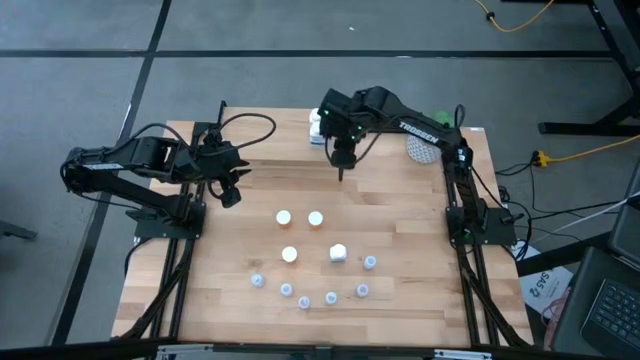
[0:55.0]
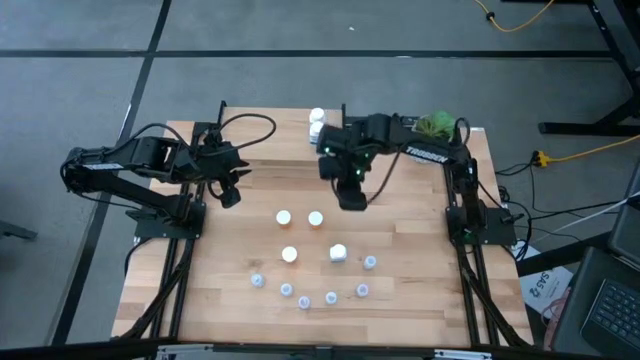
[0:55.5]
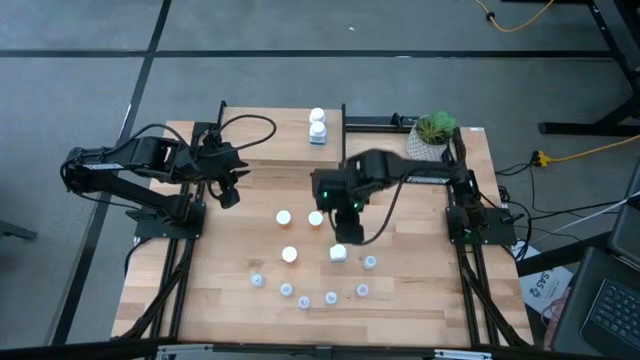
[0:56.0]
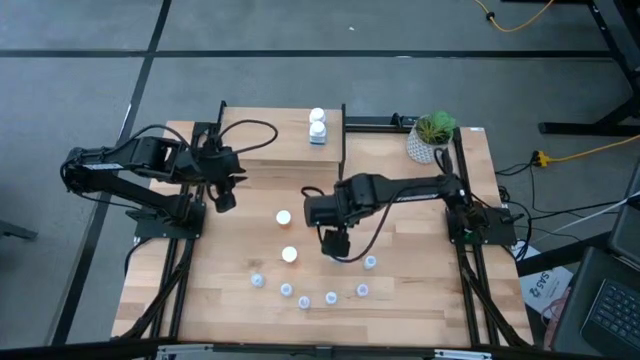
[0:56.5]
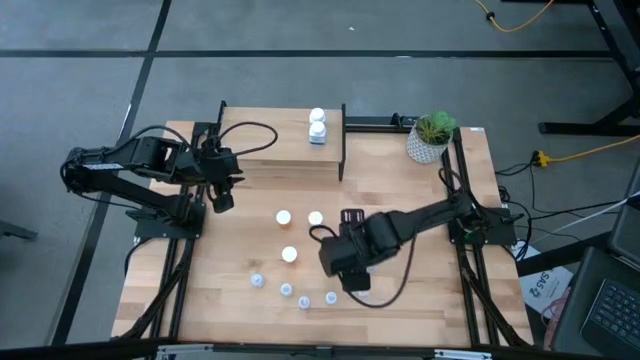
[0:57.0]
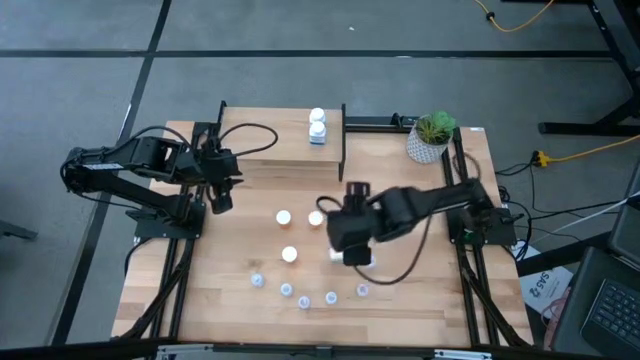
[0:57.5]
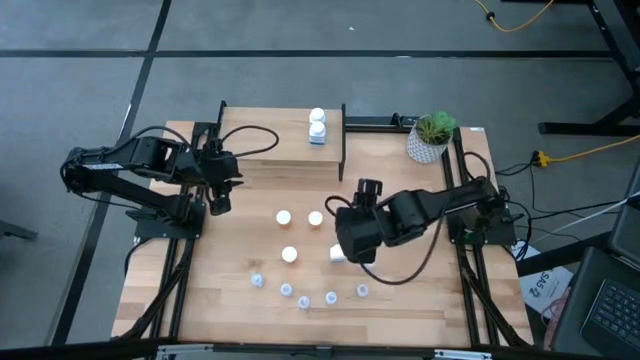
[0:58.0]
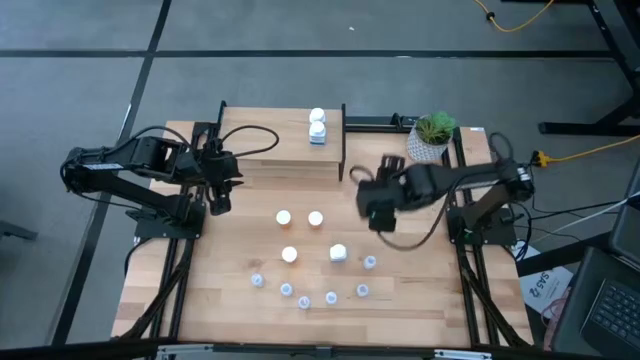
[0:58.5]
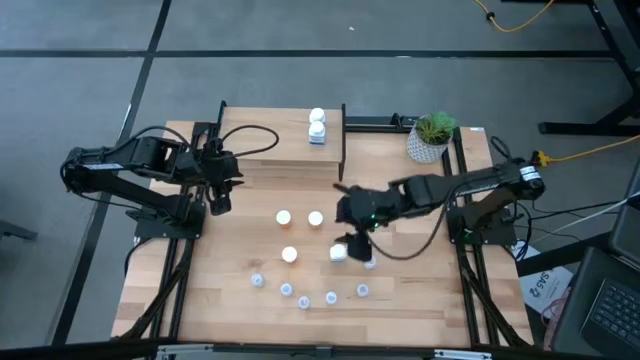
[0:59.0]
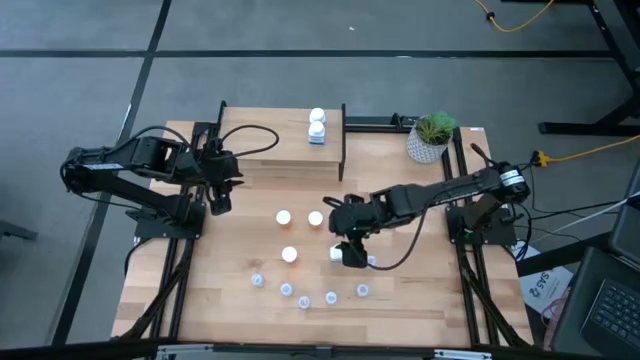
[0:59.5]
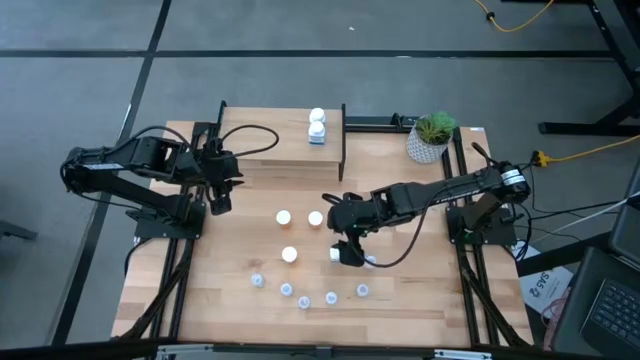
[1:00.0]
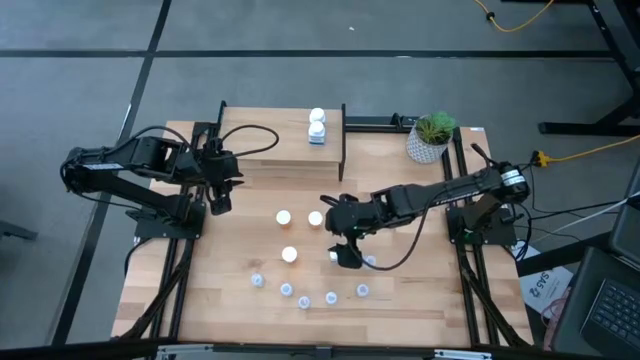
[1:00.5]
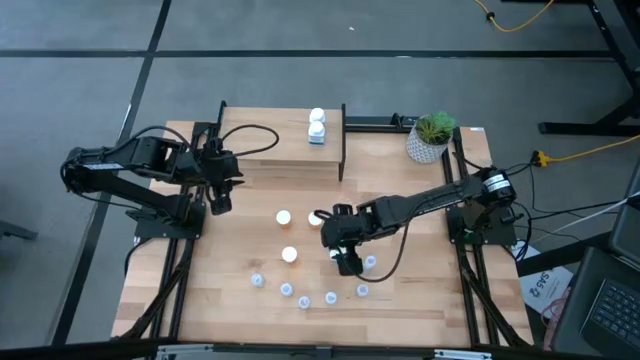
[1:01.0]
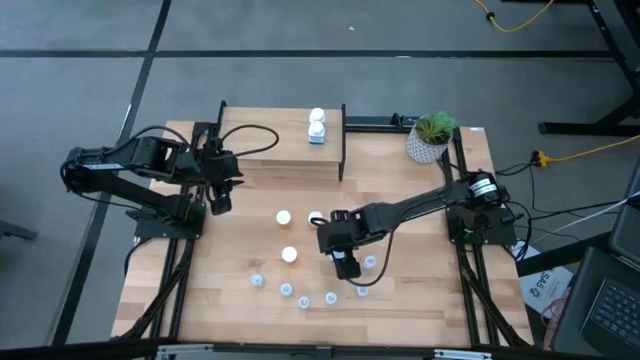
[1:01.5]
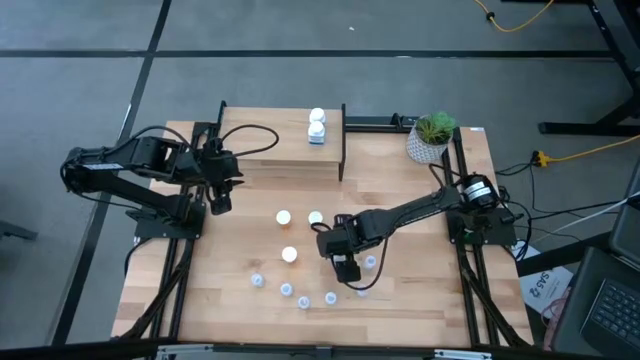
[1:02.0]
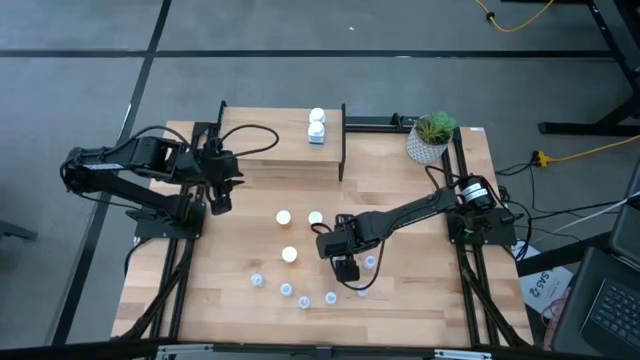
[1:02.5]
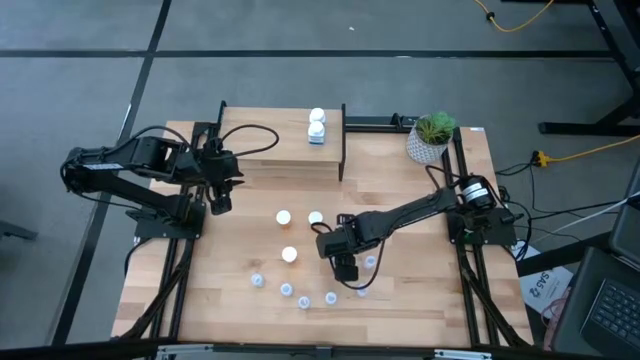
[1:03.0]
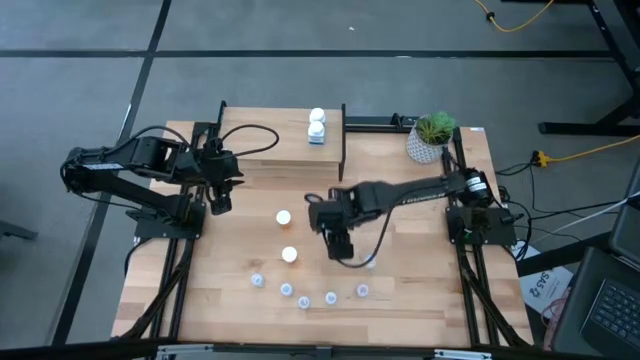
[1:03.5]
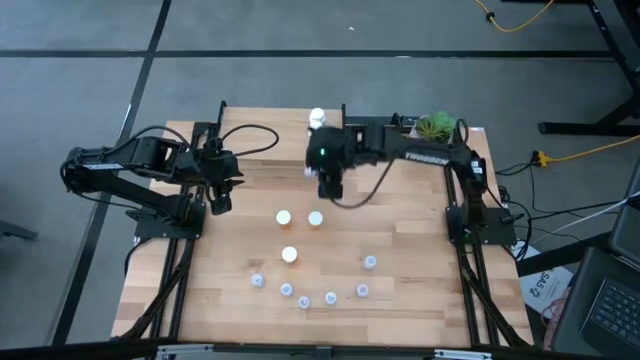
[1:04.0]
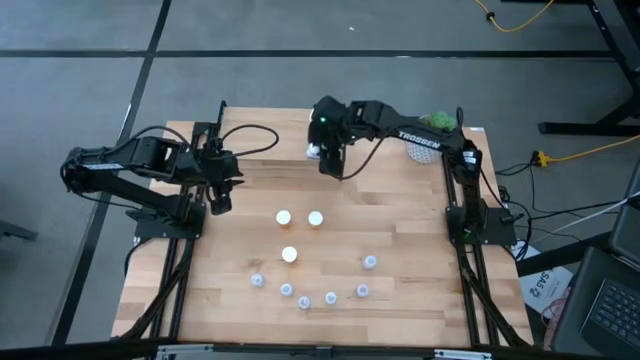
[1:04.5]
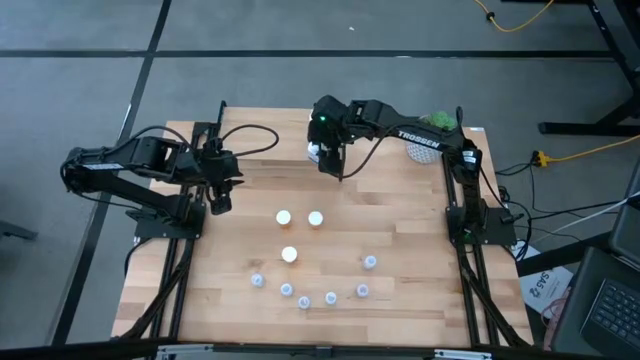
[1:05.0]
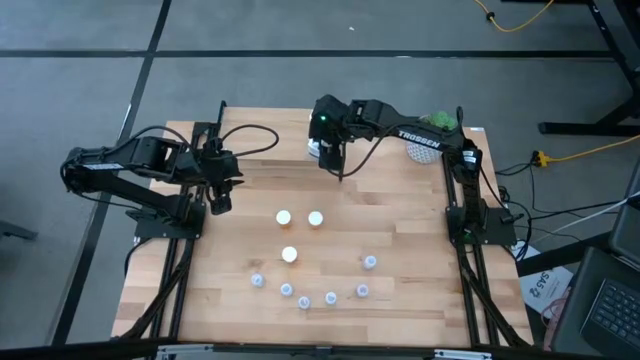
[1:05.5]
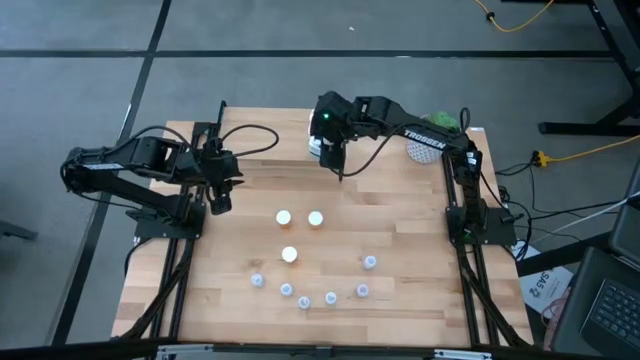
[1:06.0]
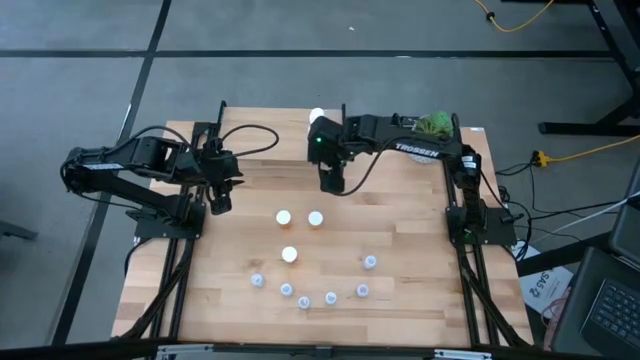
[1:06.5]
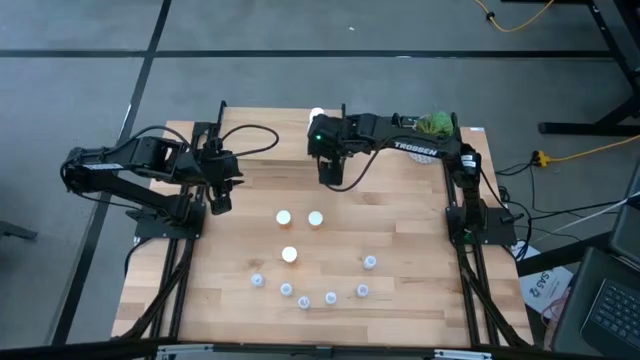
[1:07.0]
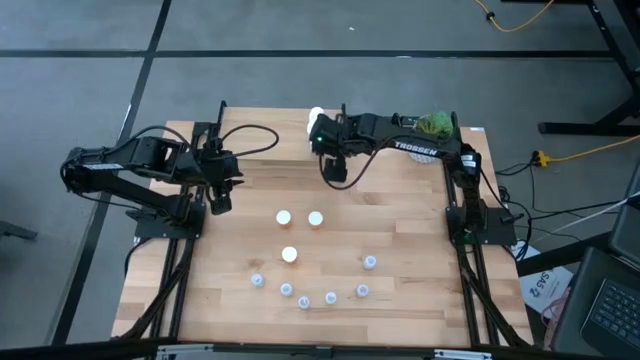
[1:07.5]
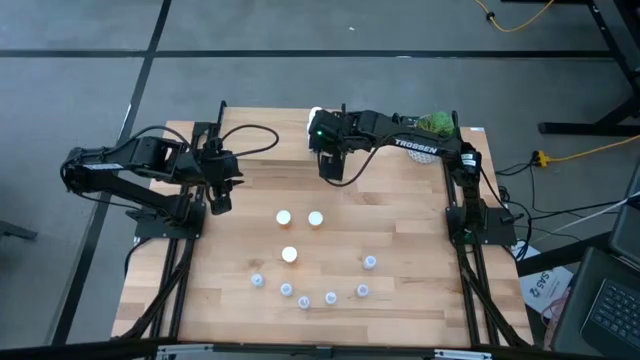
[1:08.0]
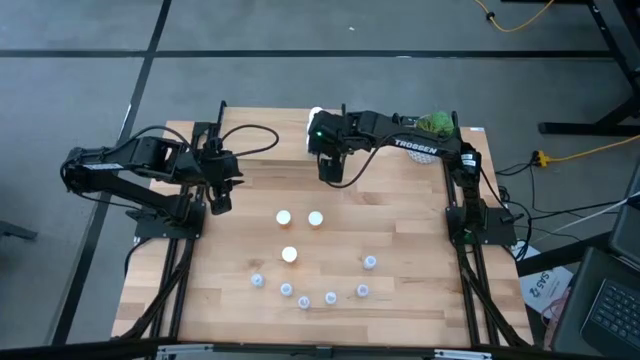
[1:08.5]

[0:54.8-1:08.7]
Task: Pick and place medicine bottles onto shelf by color
Put the blue pill bottle on the shelf aligned with the blue pill bottles

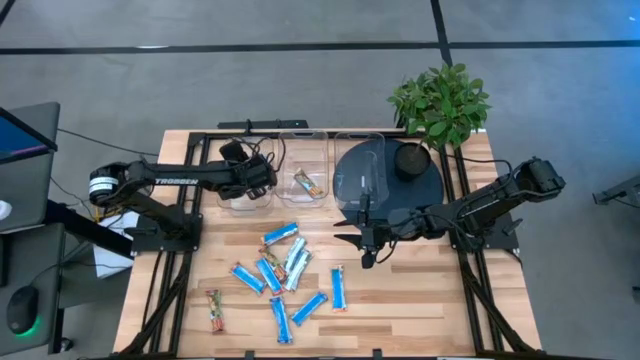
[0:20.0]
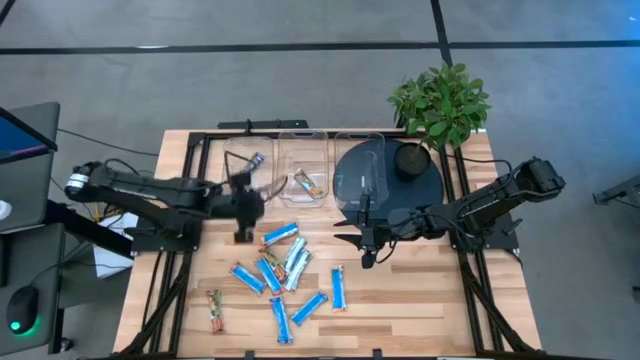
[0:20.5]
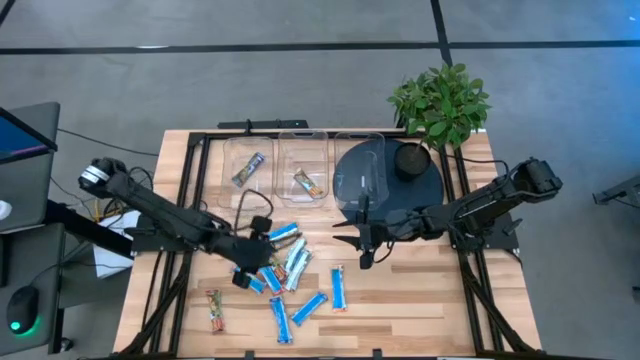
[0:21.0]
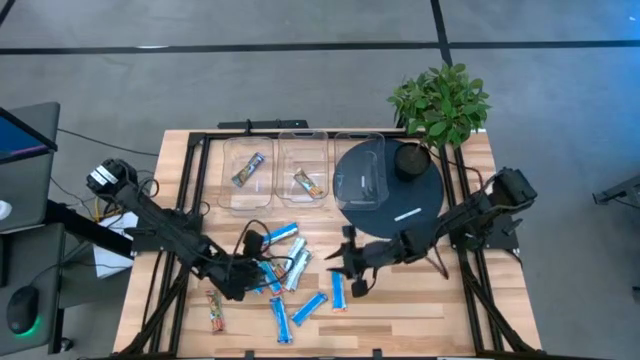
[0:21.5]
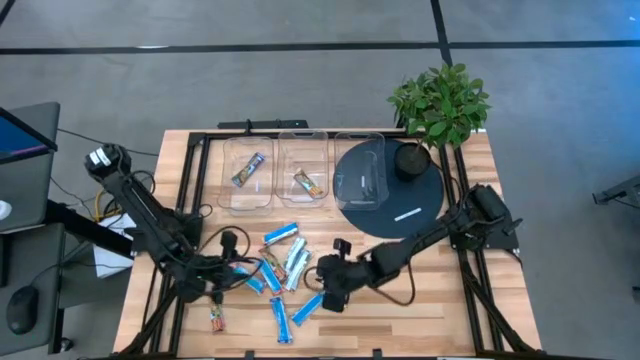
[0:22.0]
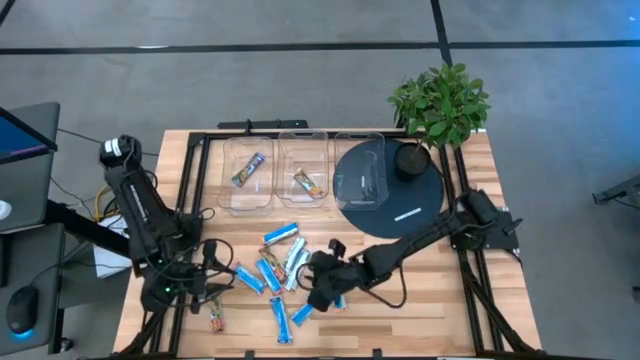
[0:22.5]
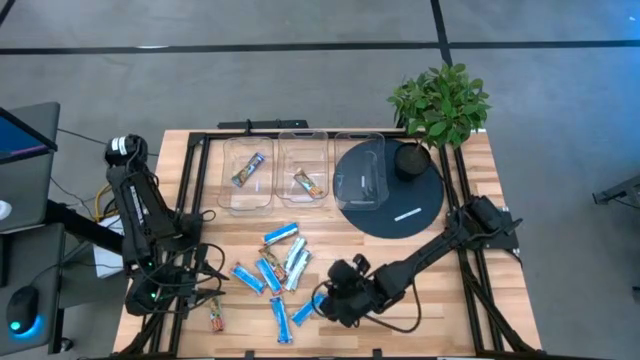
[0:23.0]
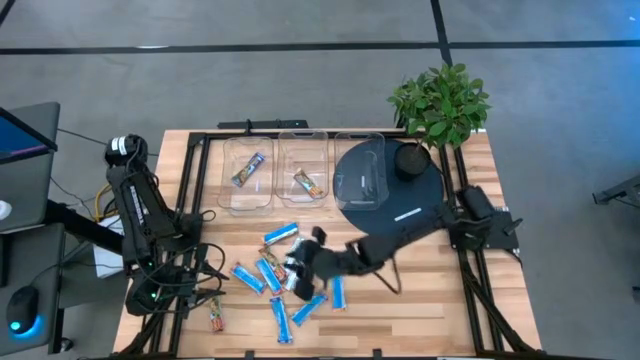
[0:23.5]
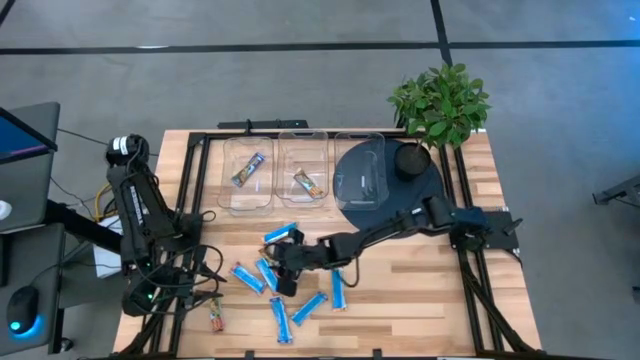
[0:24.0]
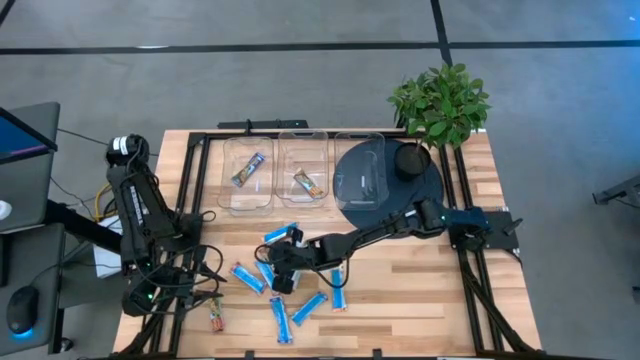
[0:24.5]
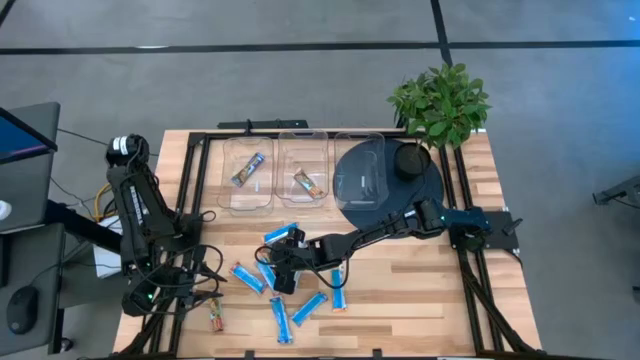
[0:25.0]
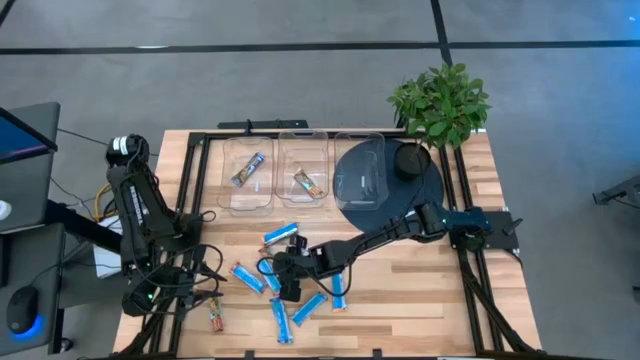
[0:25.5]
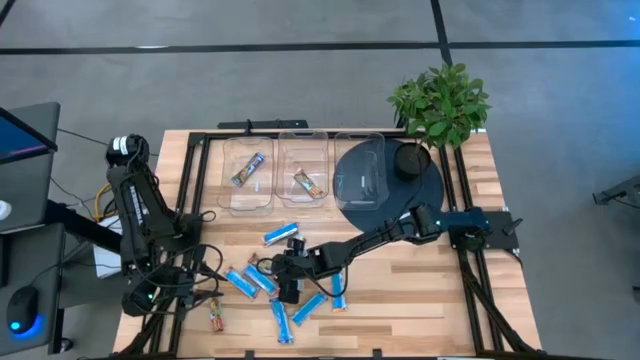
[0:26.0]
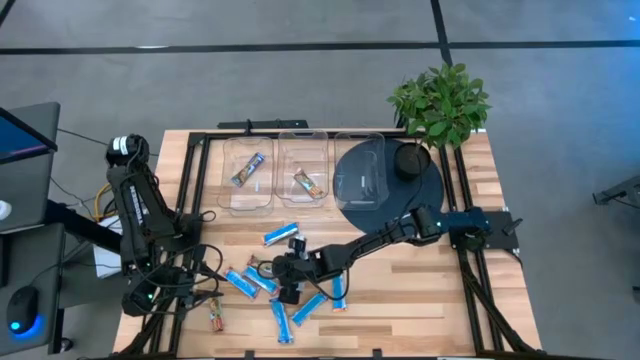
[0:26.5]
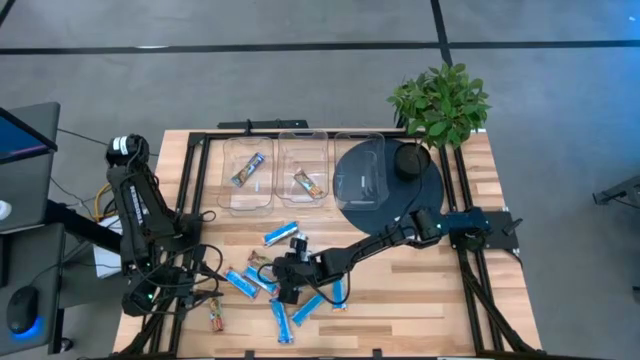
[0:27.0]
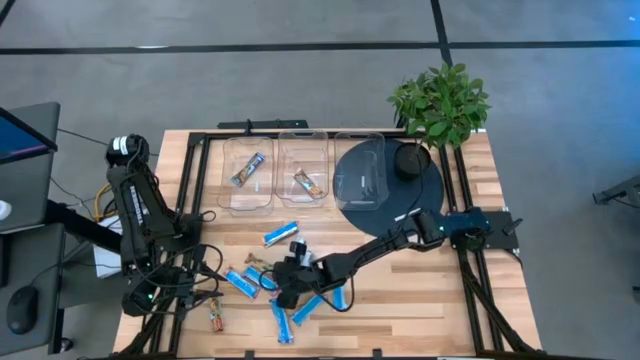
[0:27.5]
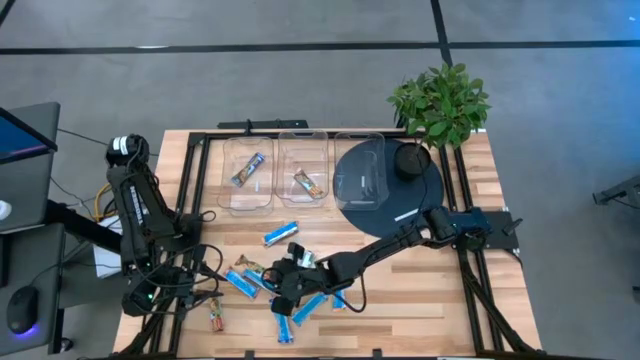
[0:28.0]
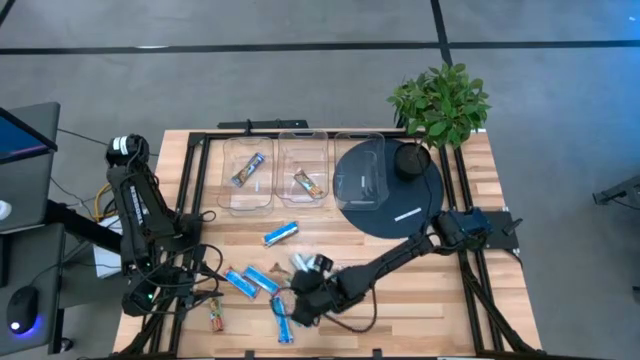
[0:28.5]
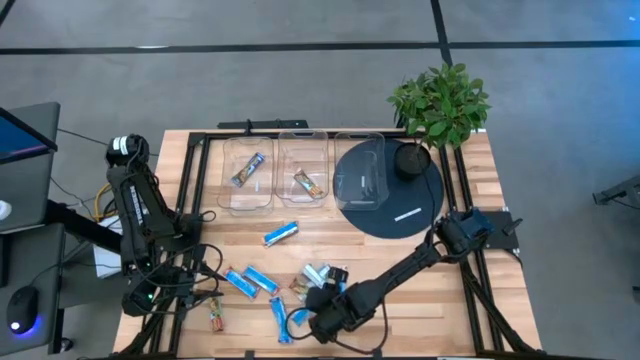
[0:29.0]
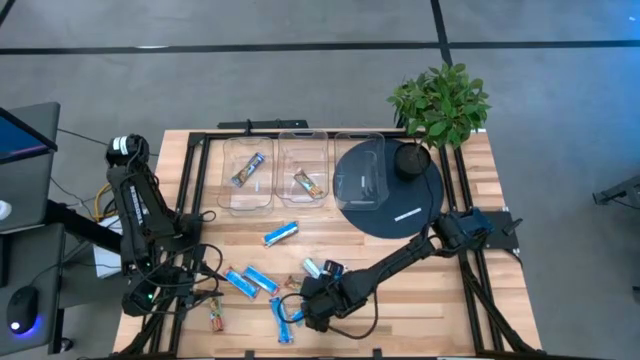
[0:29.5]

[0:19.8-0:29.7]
Task: Pick and place Granola Bars by type
Put the red granola bar into the right transparent bin
